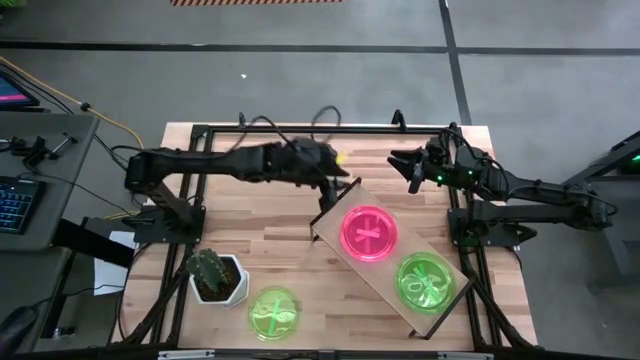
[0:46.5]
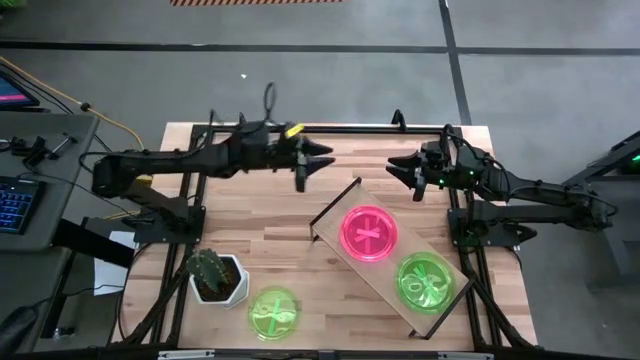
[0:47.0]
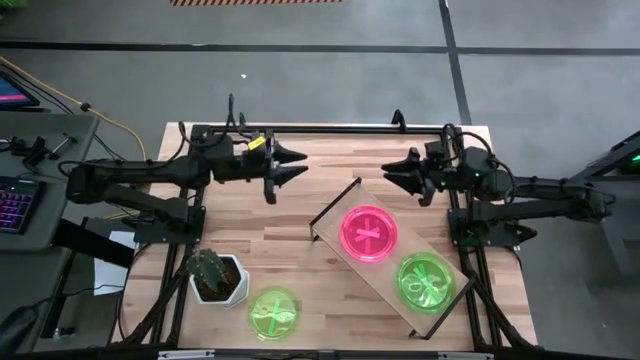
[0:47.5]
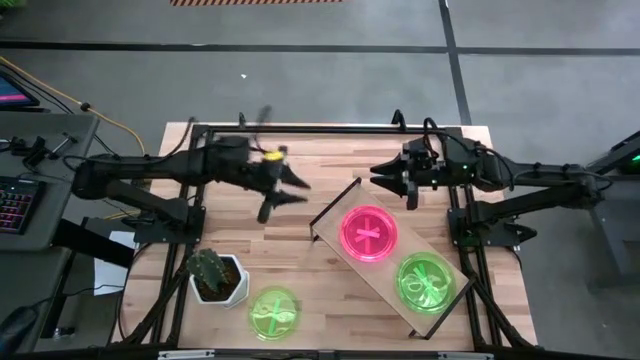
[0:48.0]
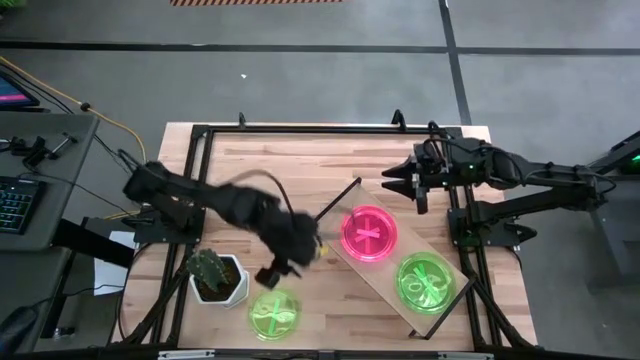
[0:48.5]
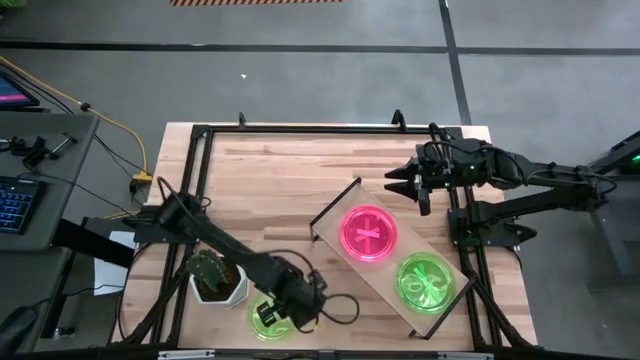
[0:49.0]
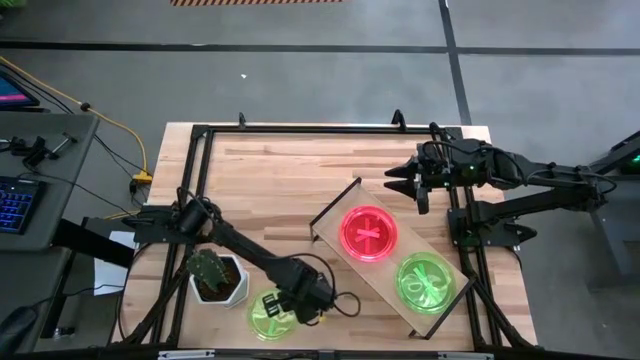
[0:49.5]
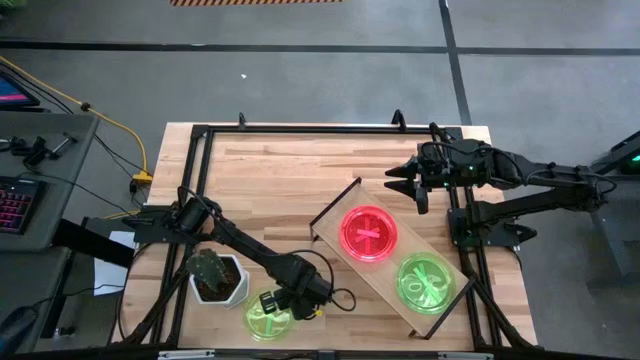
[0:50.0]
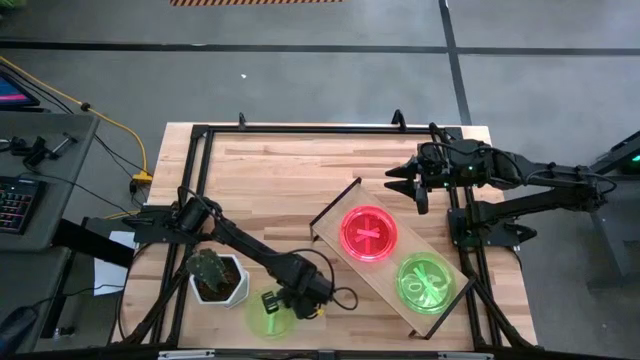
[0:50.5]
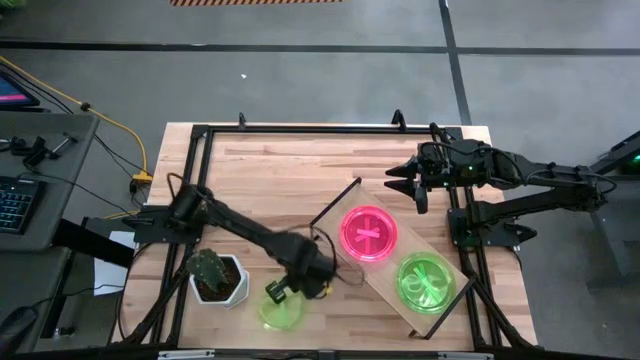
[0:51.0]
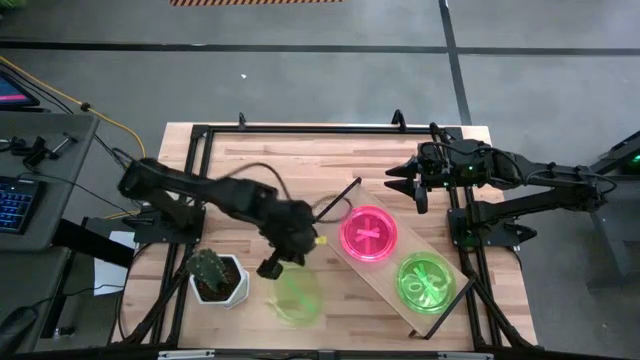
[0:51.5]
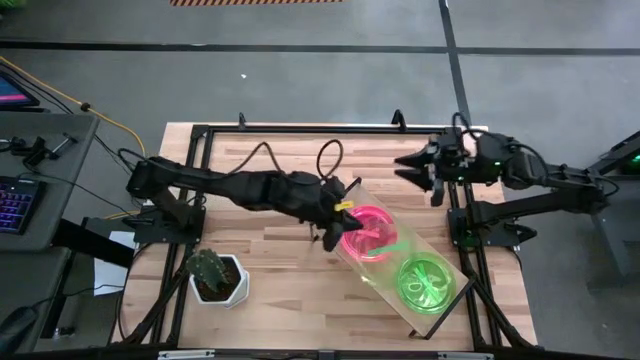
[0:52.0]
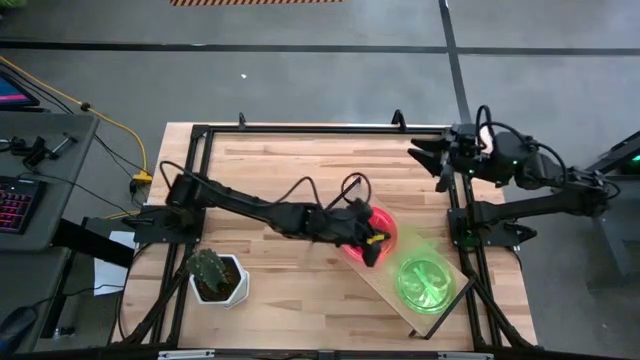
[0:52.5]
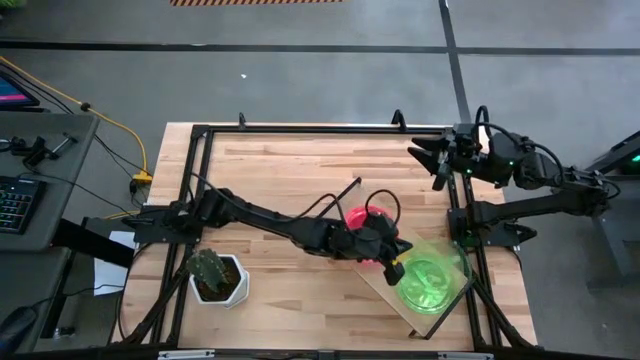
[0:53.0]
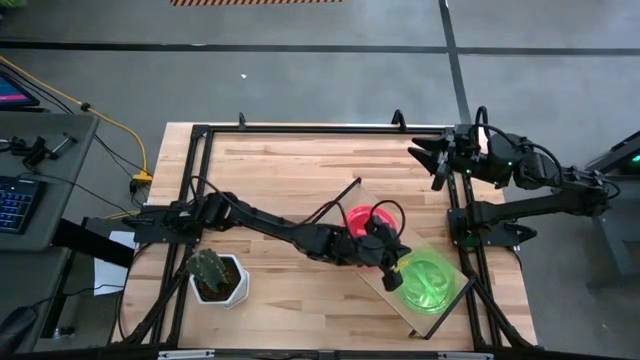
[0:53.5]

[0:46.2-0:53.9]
Task: Place and stack plates onto a shelf
Stack the green plate on top of the green plate on the shelf

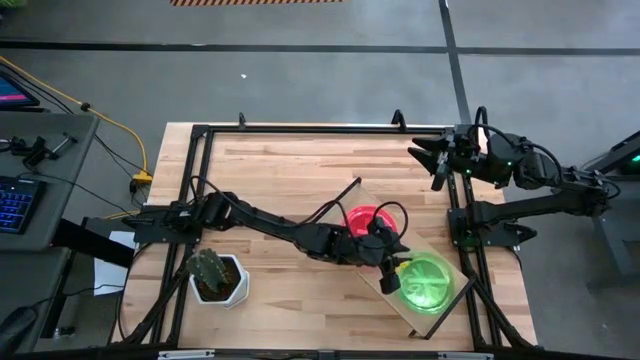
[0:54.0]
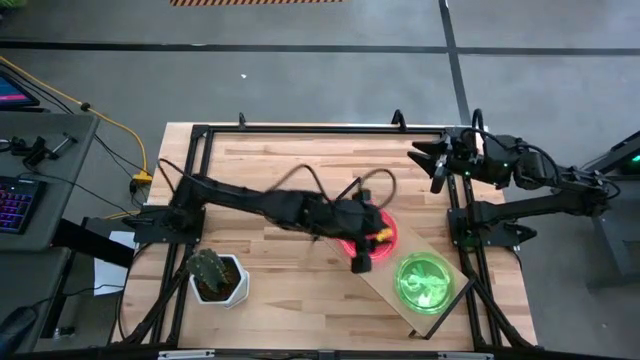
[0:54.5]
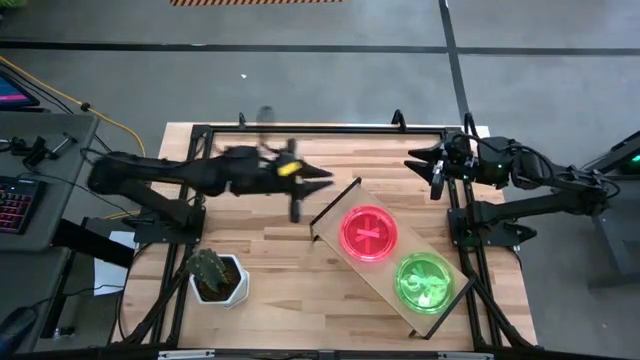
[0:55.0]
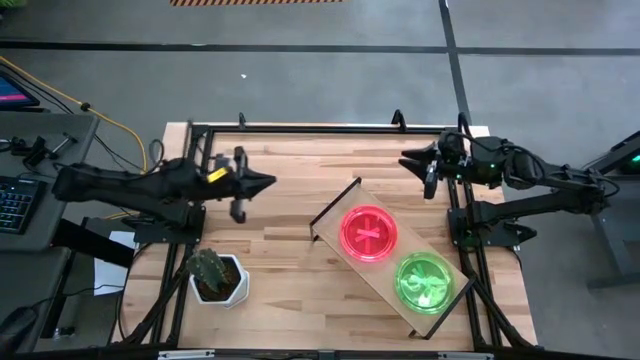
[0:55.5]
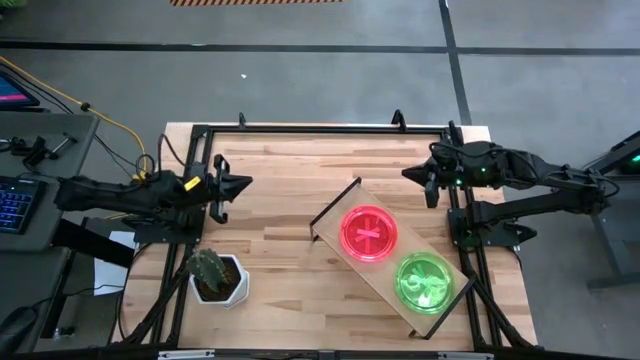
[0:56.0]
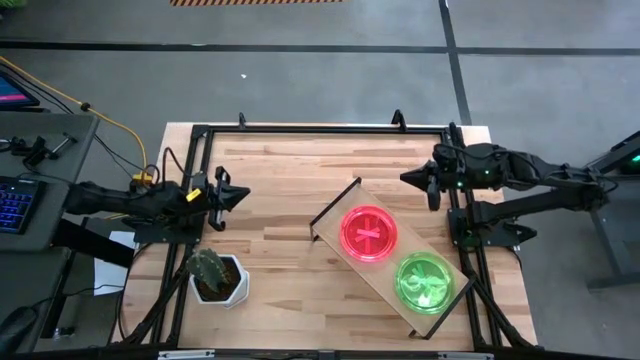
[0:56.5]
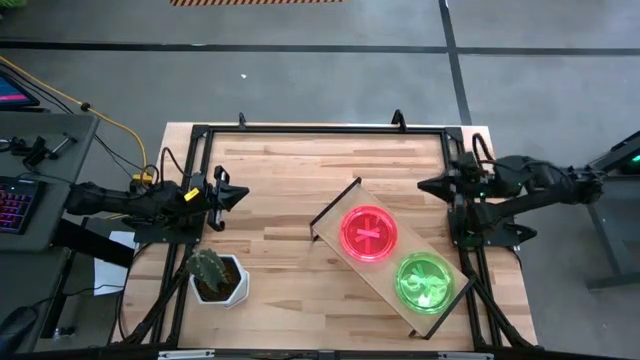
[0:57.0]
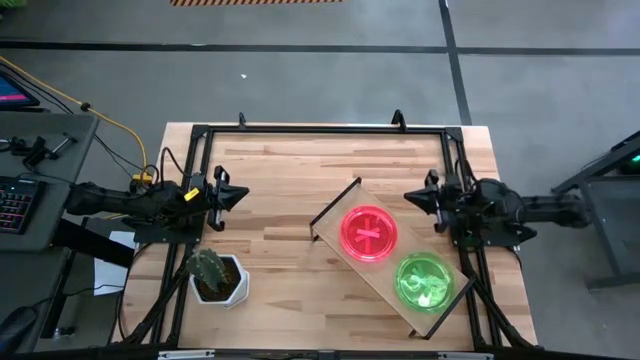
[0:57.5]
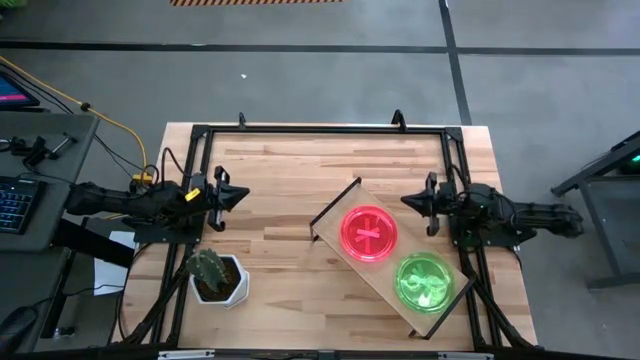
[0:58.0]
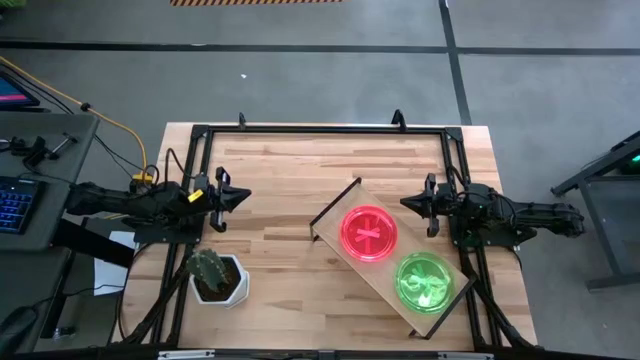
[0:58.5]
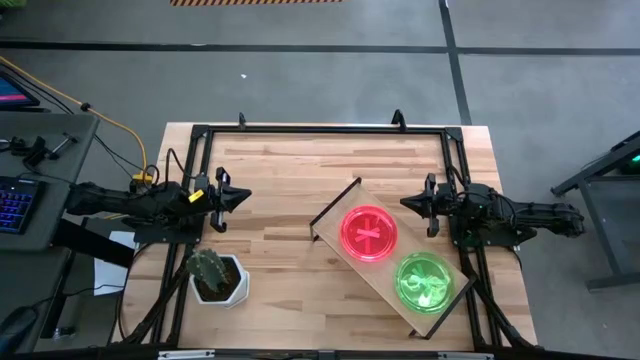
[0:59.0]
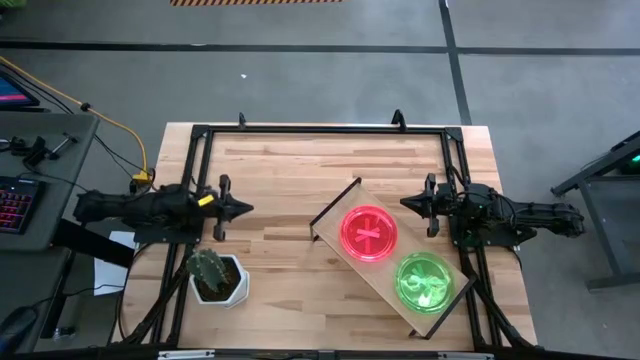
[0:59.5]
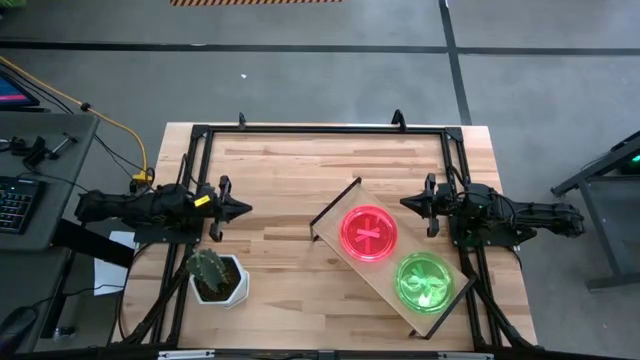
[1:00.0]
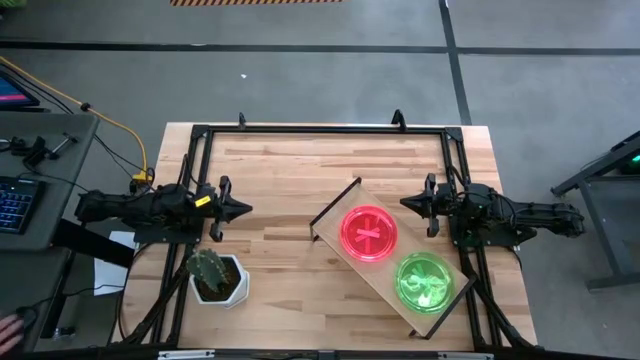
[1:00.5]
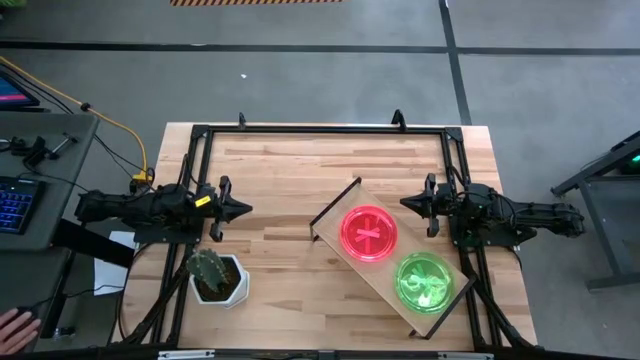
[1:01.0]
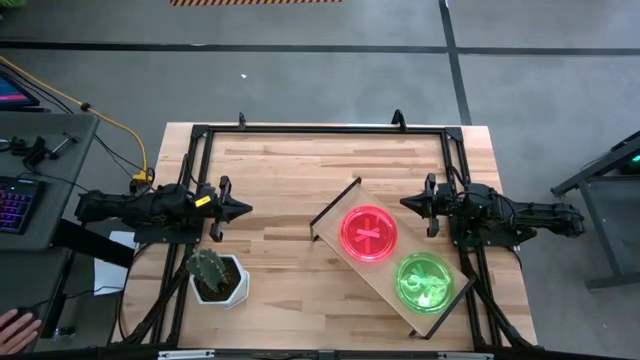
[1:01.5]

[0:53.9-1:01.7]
Return to Home Position

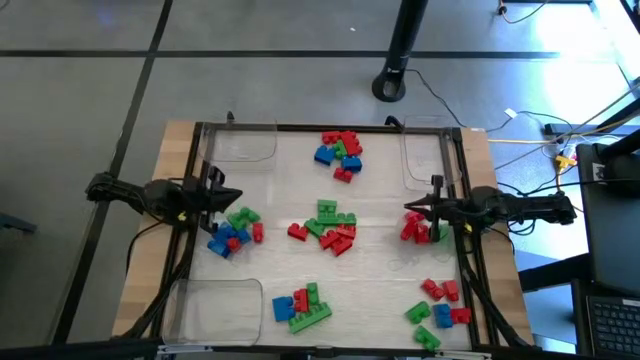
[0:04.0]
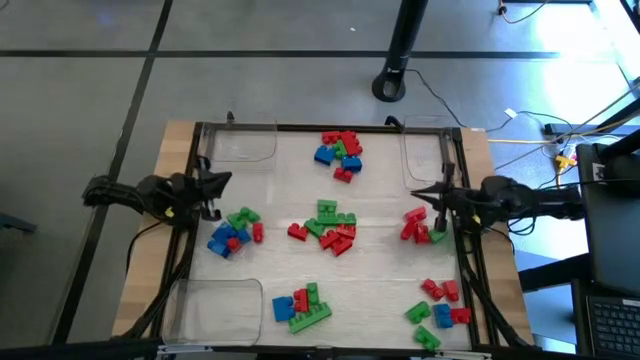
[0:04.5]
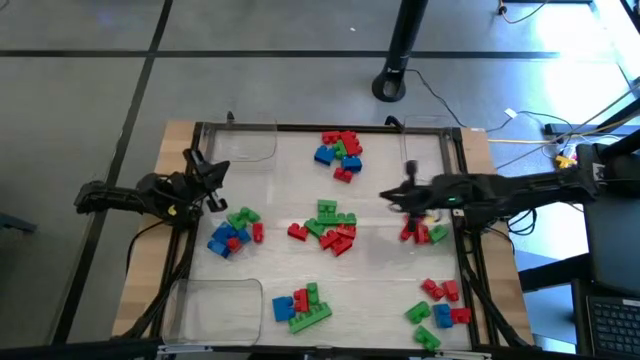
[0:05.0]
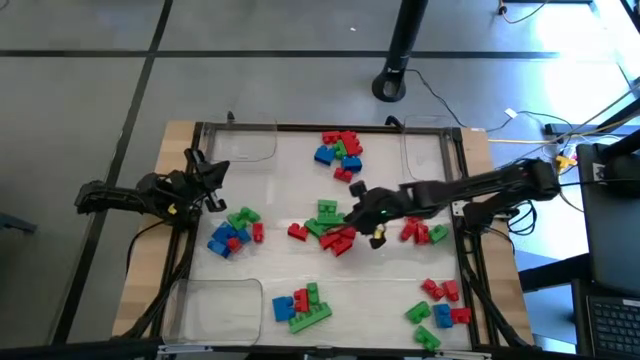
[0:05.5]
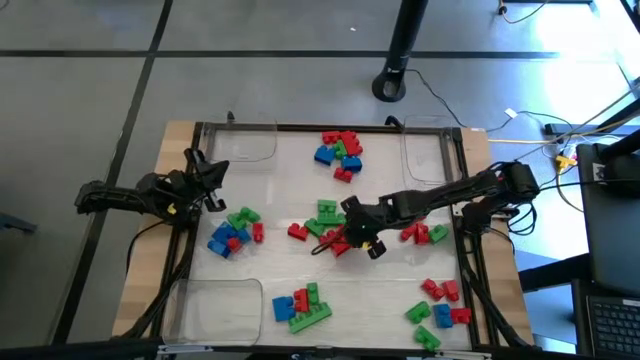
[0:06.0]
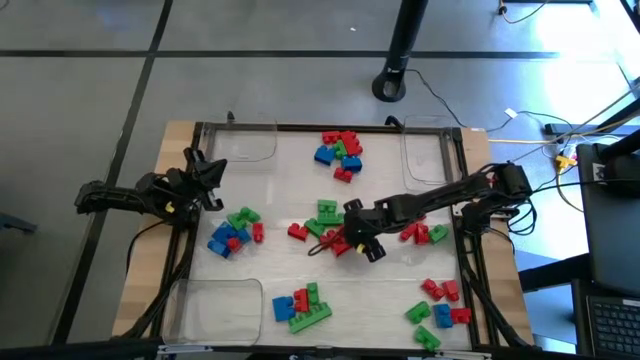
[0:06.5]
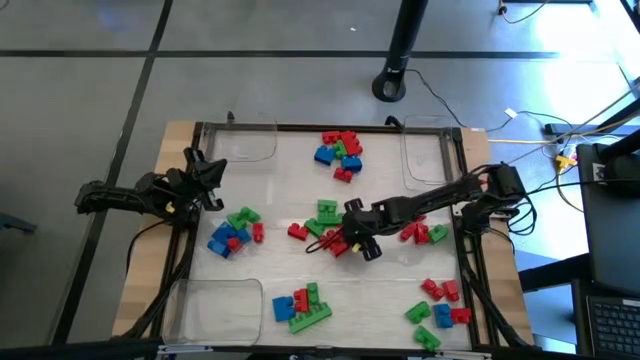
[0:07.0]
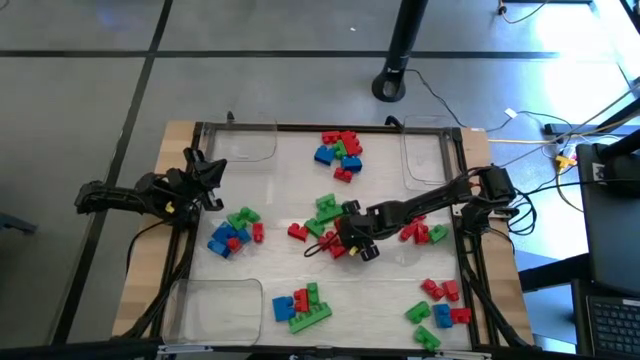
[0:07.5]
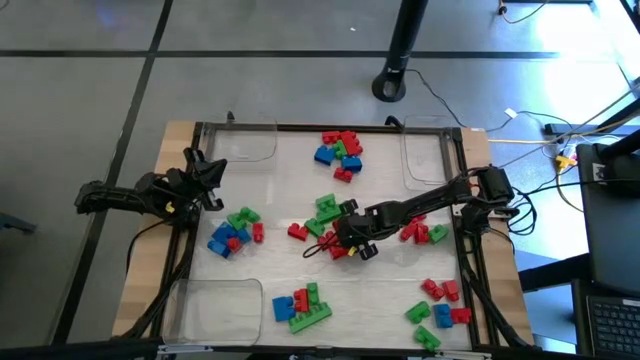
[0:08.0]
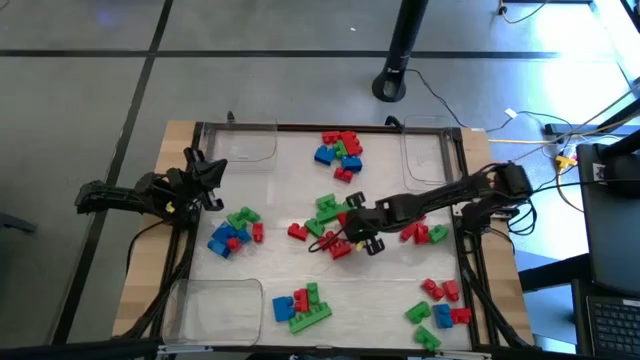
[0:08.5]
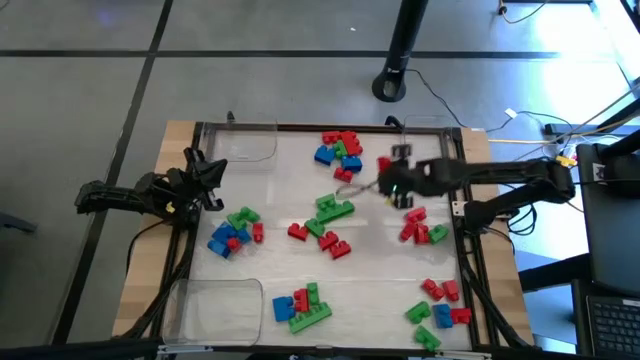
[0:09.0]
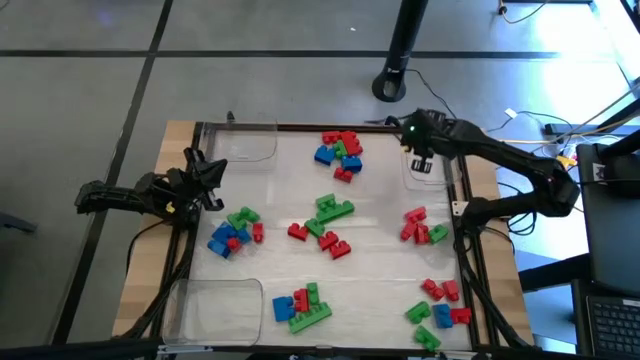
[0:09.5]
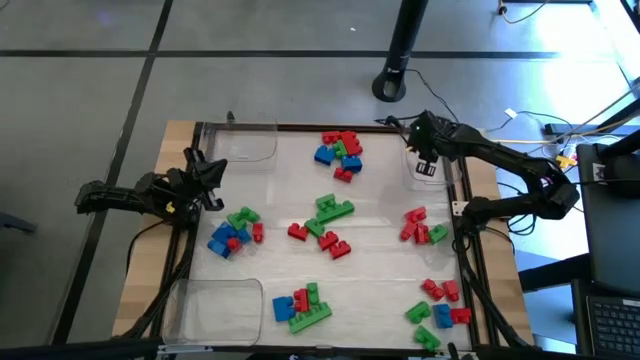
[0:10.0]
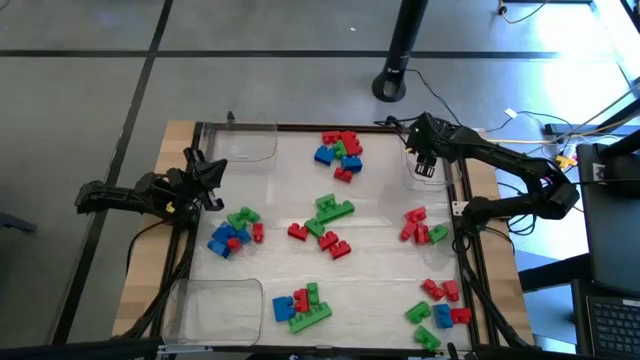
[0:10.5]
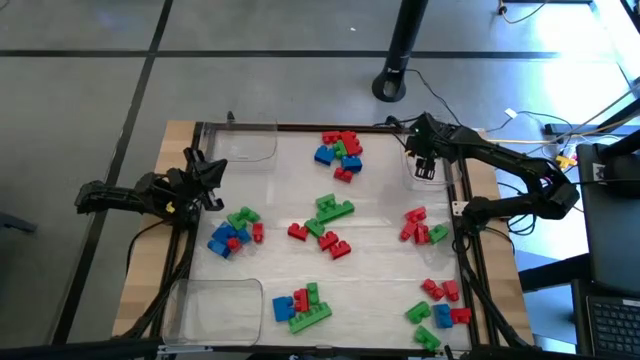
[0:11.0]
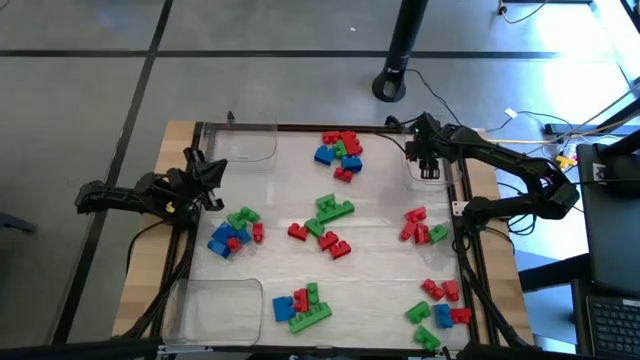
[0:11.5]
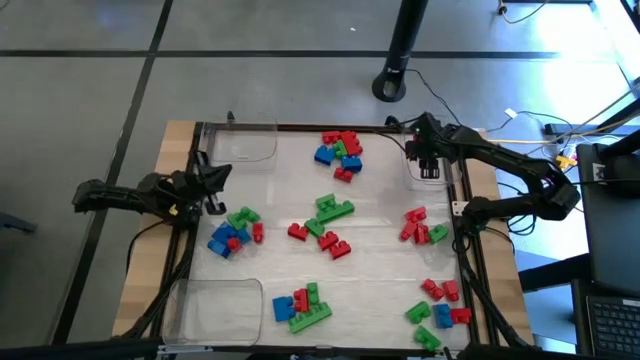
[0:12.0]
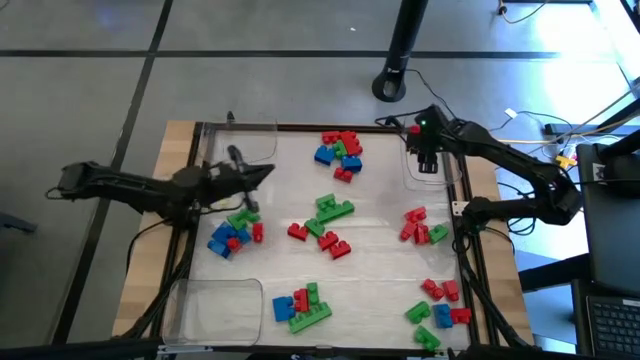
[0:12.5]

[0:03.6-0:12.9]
Task: Sort blocks
Put the red game piece into the right transparent bin
